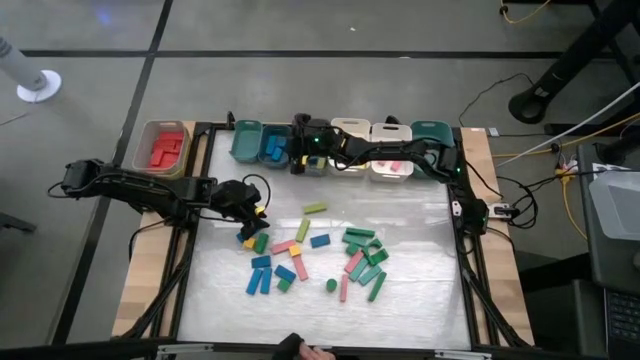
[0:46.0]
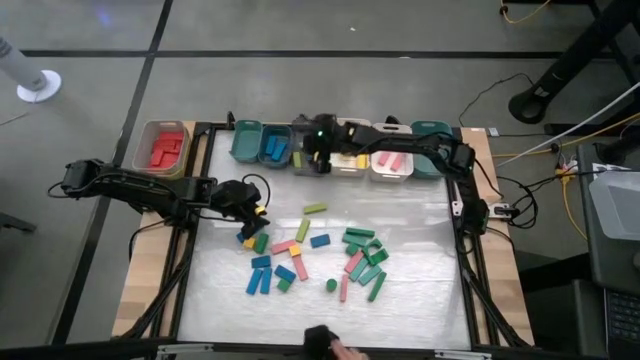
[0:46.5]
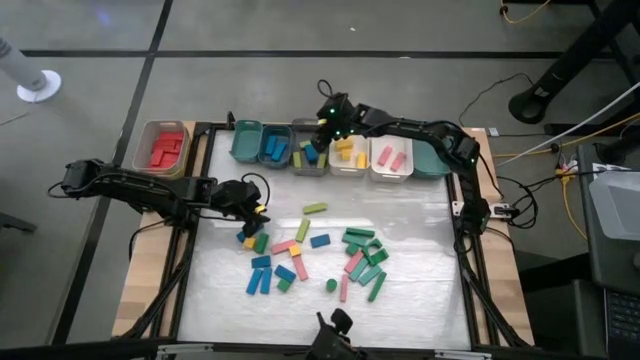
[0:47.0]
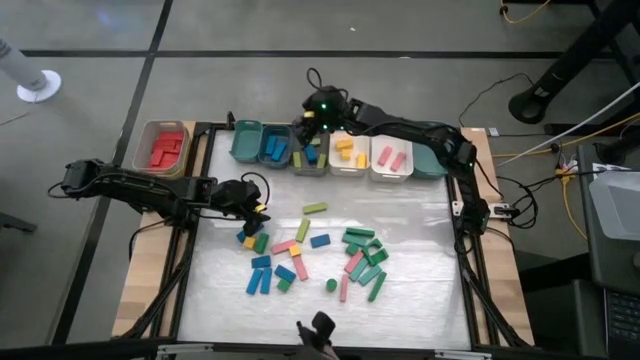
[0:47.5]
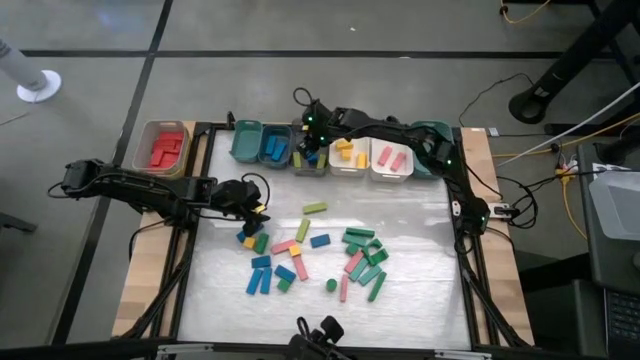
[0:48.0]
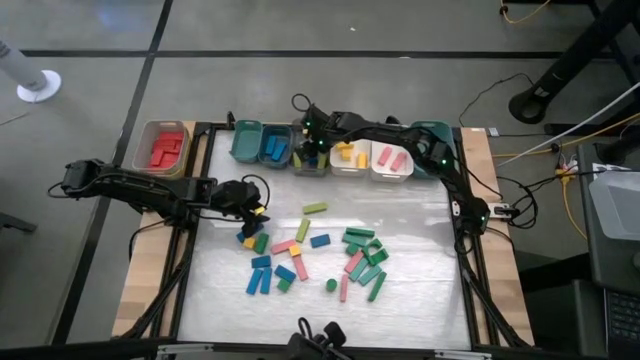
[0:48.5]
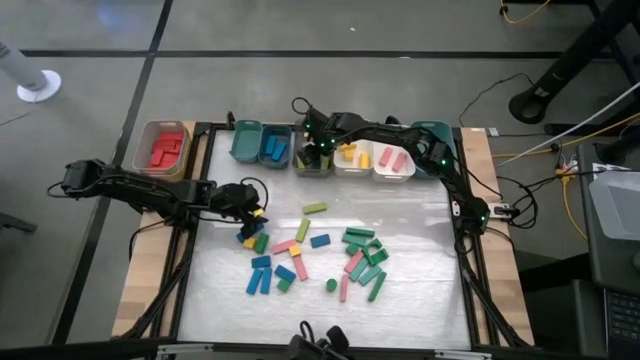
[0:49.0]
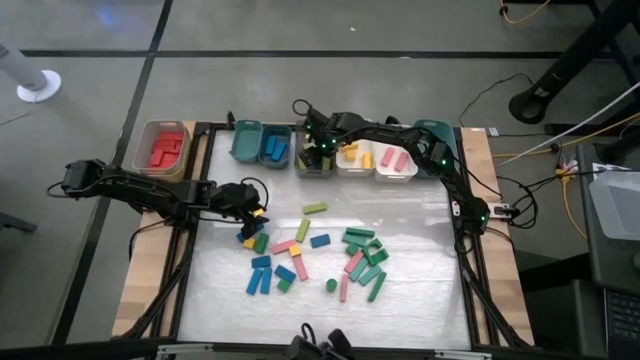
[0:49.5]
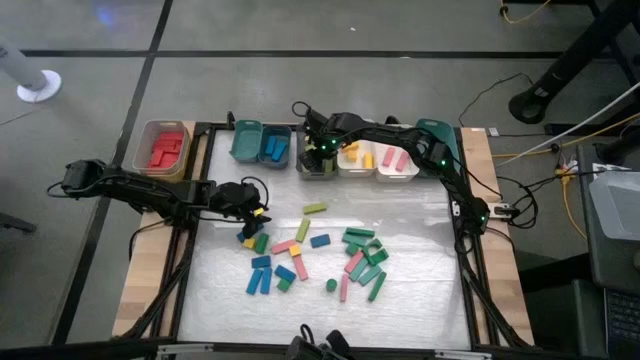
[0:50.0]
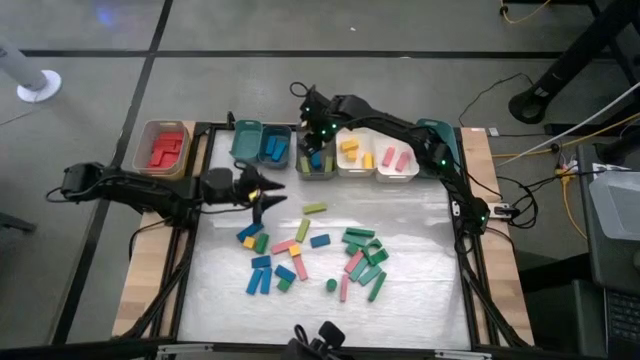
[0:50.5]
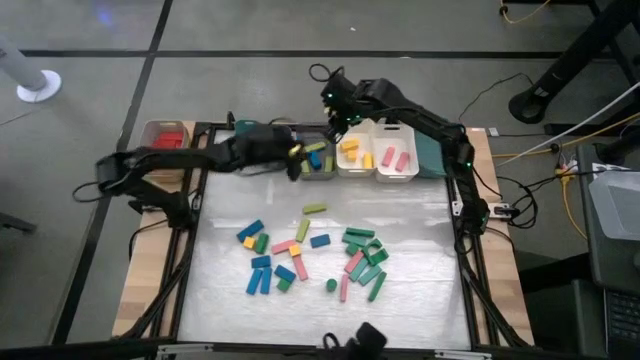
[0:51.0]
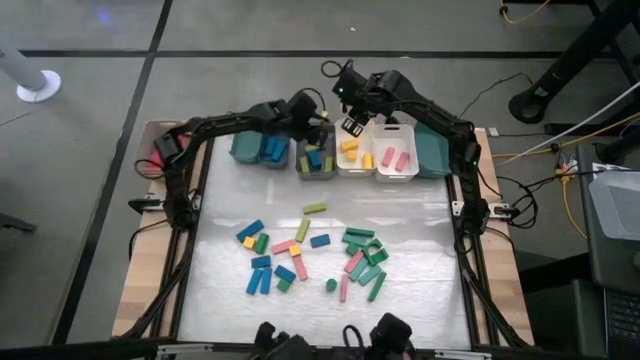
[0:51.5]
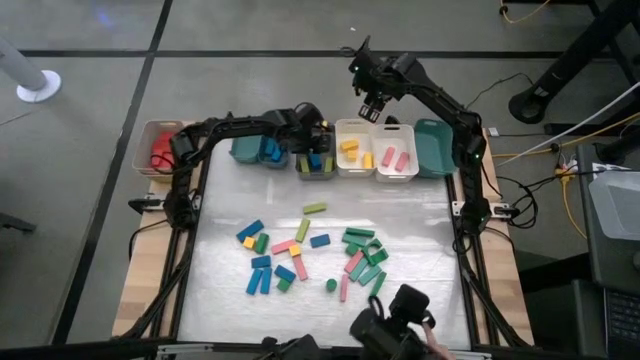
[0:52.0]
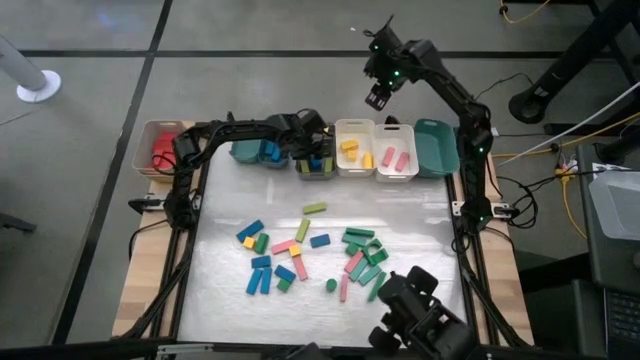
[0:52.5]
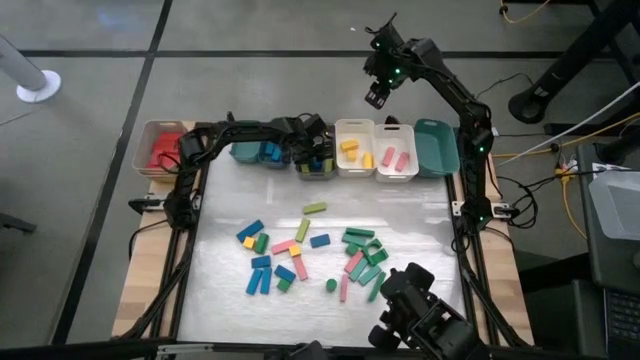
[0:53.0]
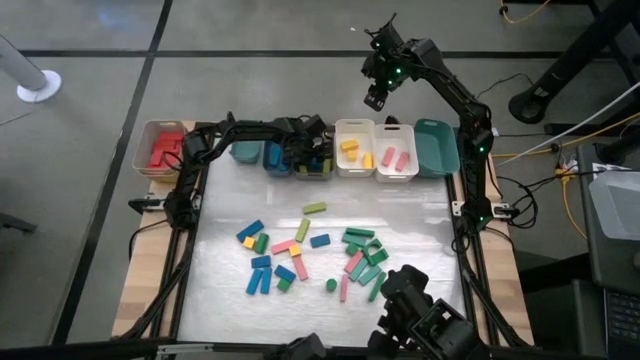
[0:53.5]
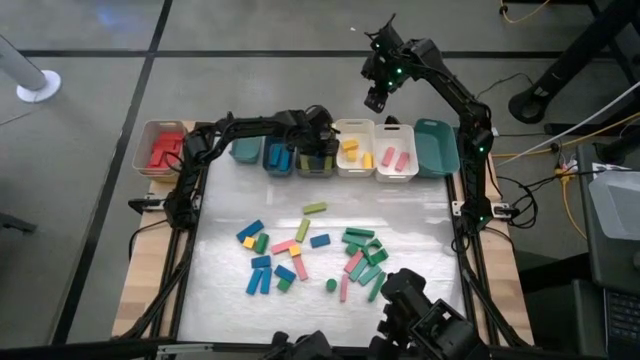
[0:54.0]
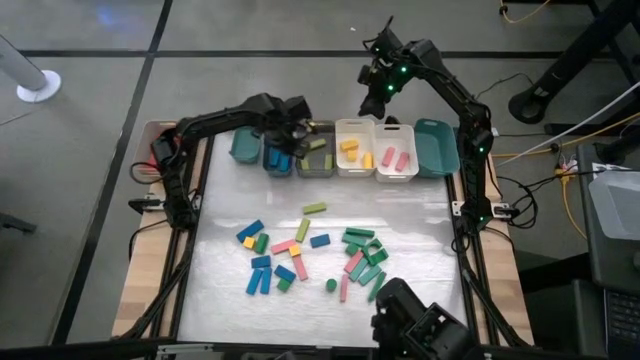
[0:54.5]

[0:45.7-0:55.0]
Task: Sort blocks
Put the blue block into the blue bin

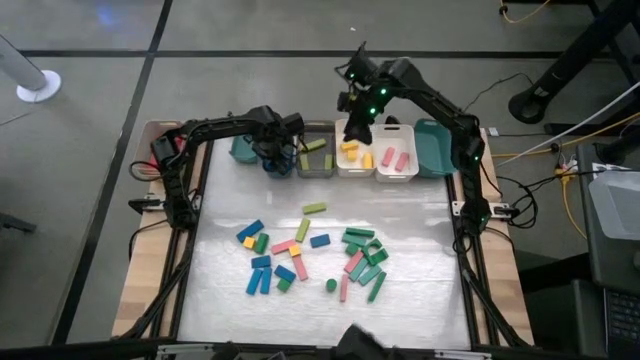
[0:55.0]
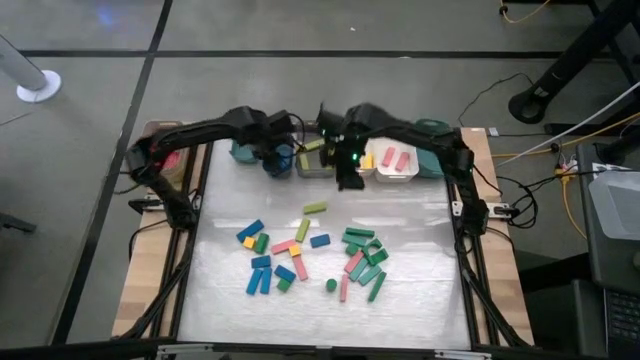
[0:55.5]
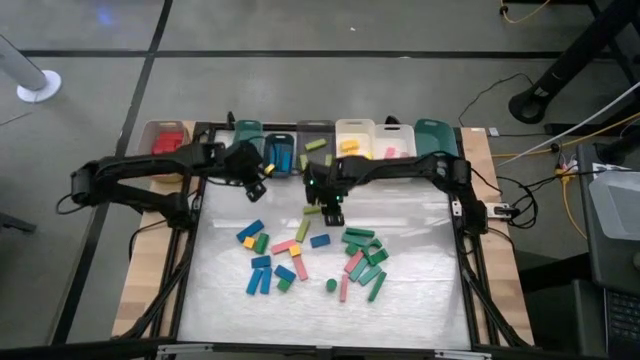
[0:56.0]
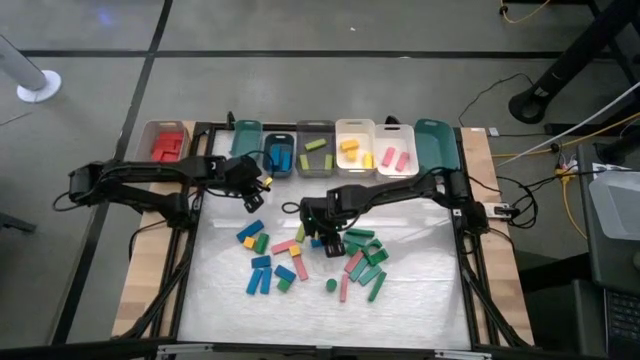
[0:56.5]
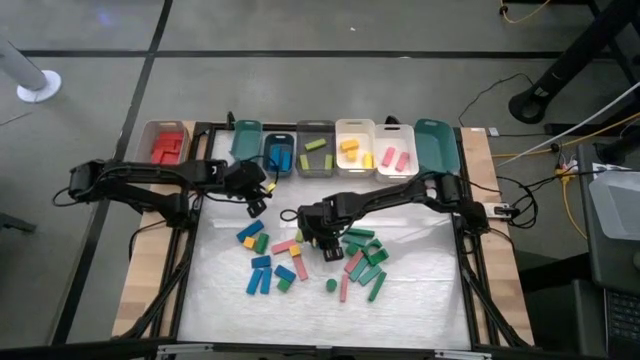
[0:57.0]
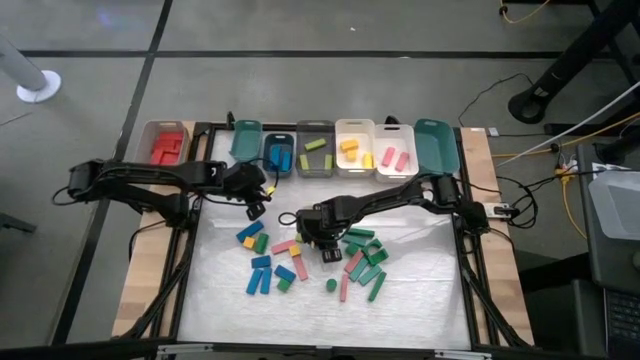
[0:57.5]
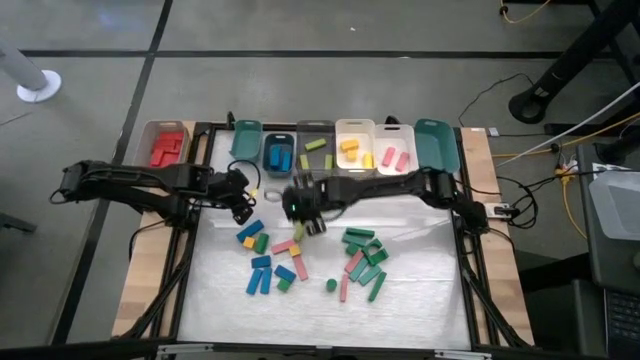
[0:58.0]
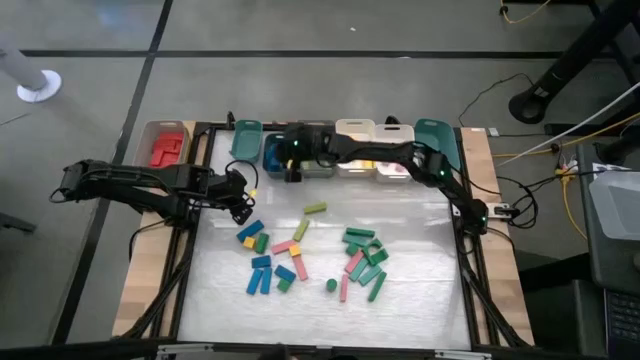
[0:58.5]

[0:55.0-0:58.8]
Put the blue block into the blue bin

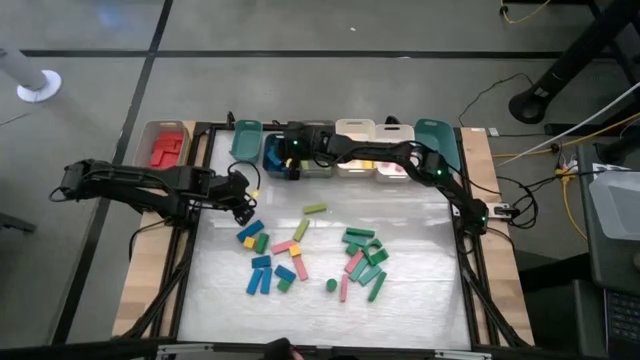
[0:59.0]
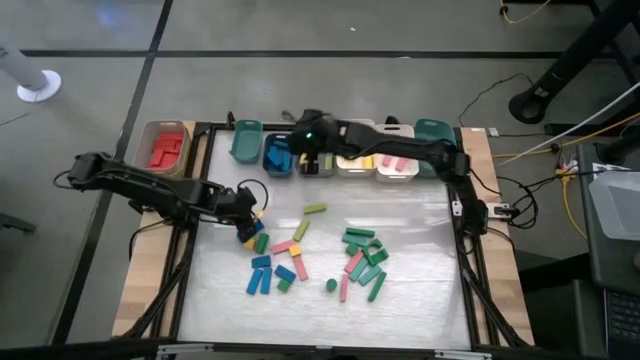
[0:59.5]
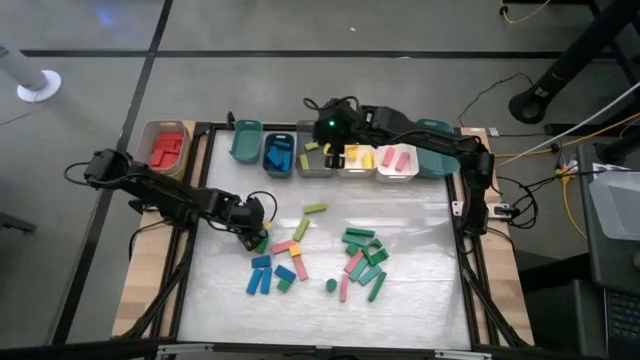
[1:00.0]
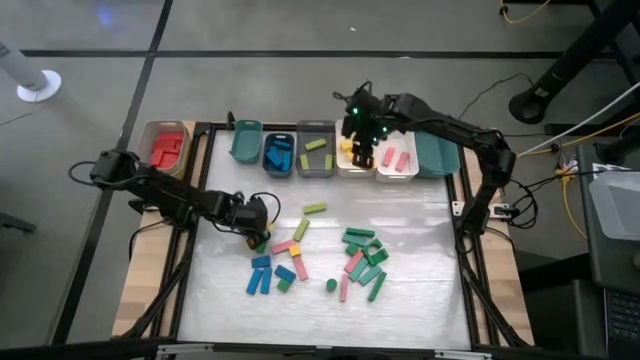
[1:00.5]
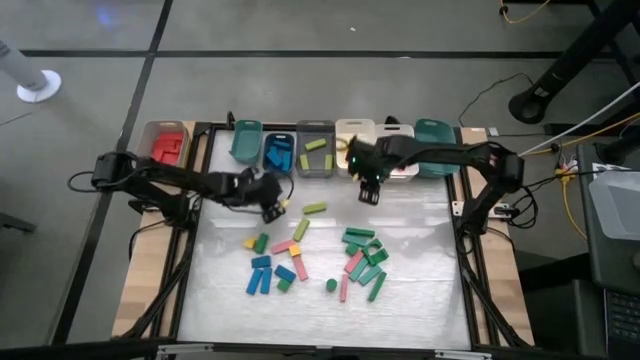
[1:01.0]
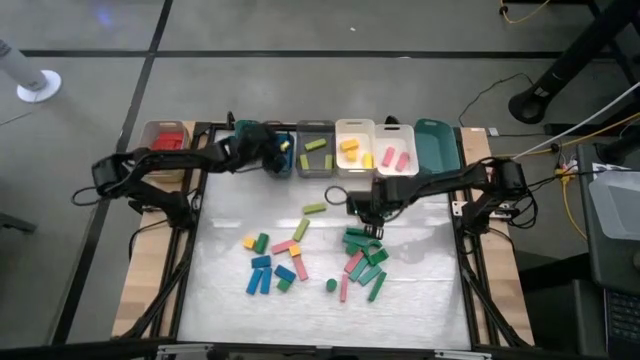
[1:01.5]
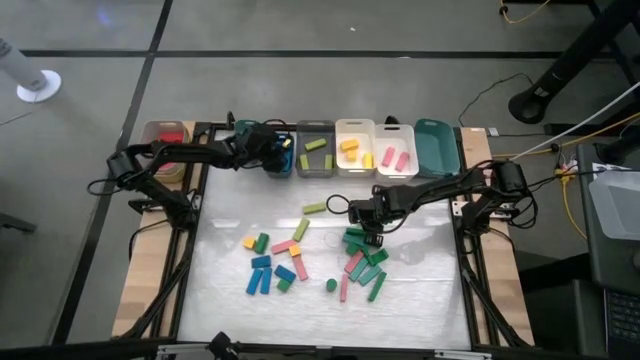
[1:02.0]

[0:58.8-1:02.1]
Put the blue block into the blue bin

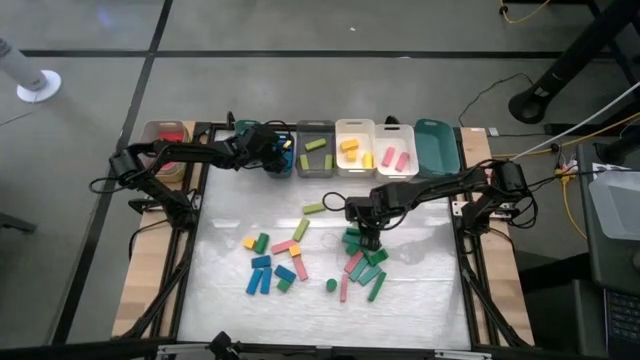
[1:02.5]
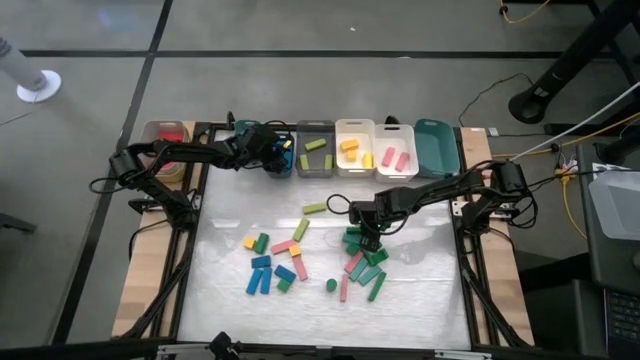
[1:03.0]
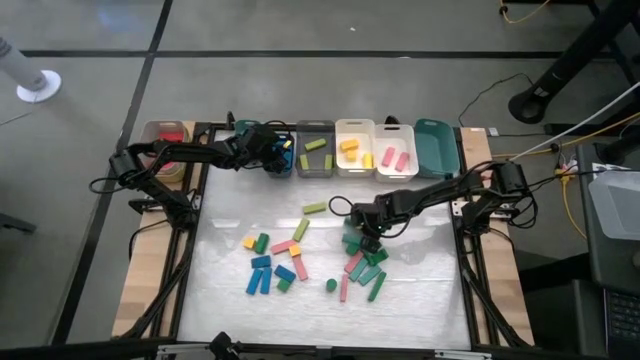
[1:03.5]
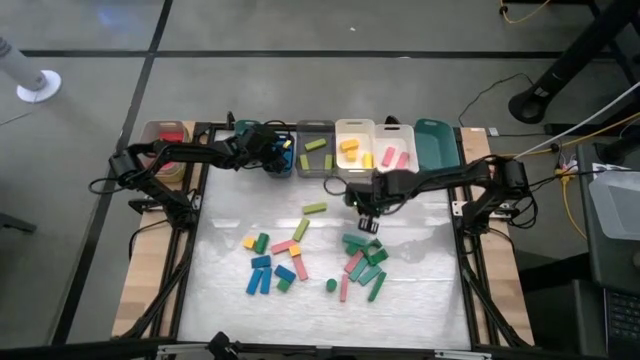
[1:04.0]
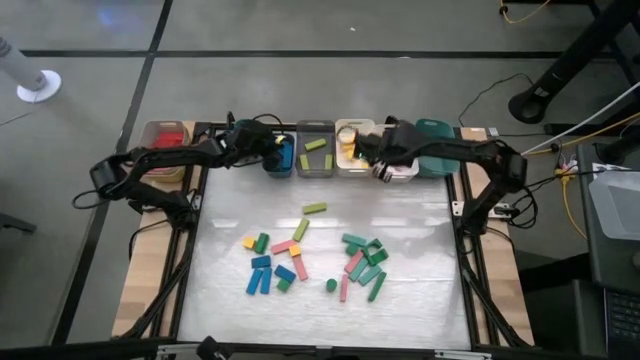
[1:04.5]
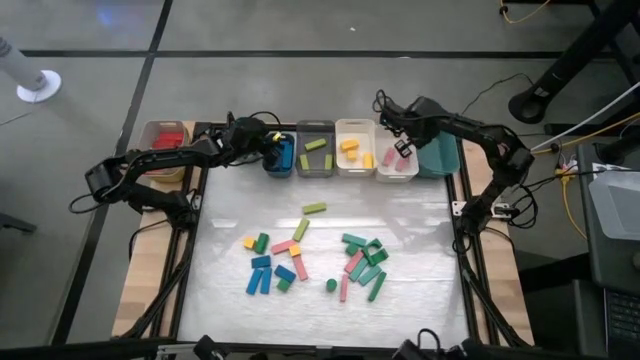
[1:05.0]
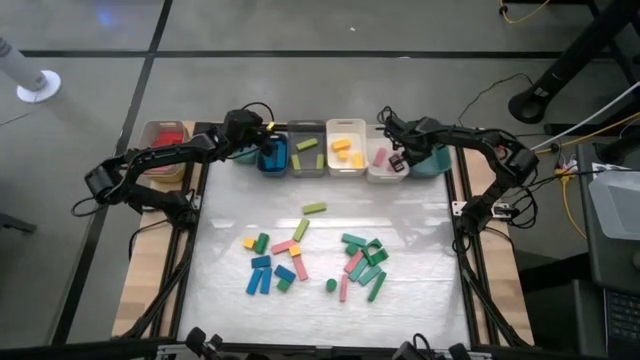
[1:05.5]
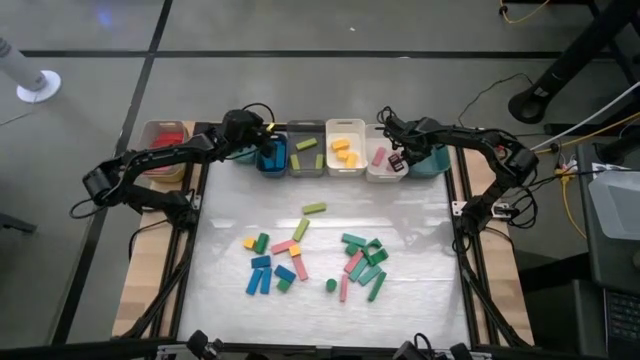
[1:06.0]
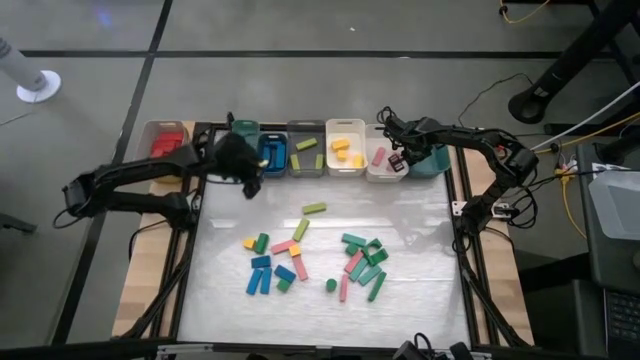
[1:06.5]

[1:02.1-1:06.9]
Put the green block into the right green bin

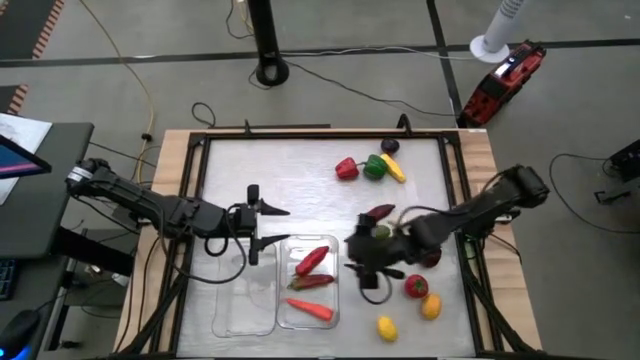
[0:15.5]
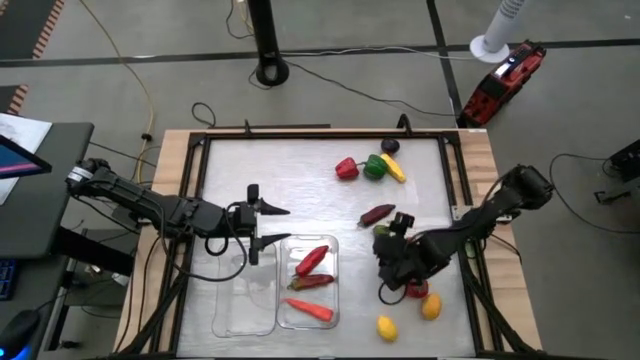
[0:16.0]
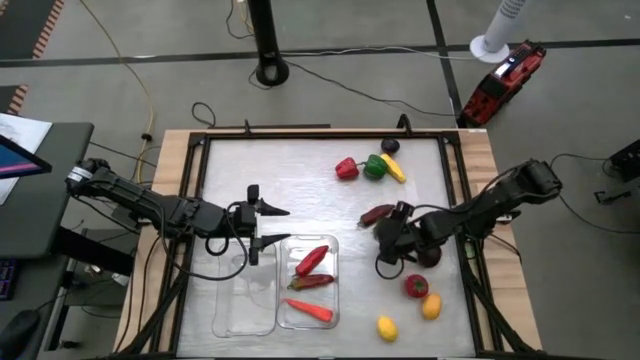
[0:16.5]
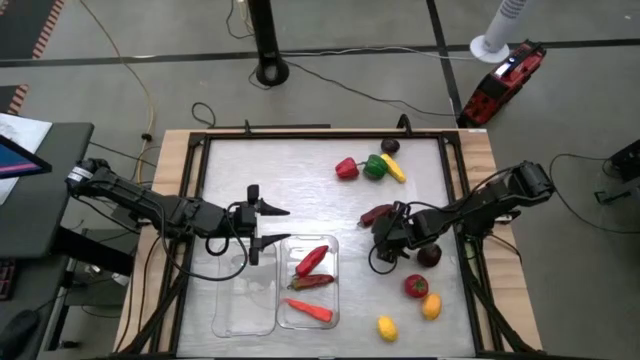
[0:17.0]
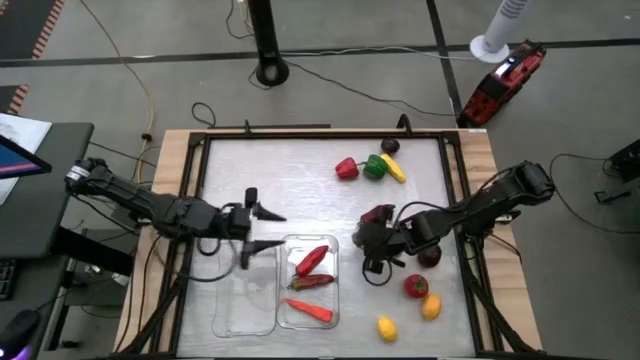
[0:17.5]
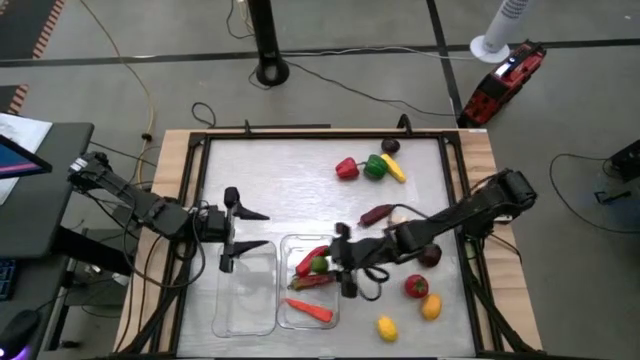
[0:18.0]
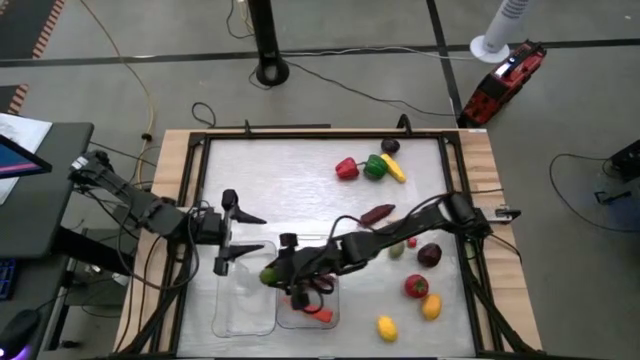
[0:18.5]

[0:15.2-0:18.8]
Task: Sort produce into baskets
Put the top green lime into the left transparent bin
